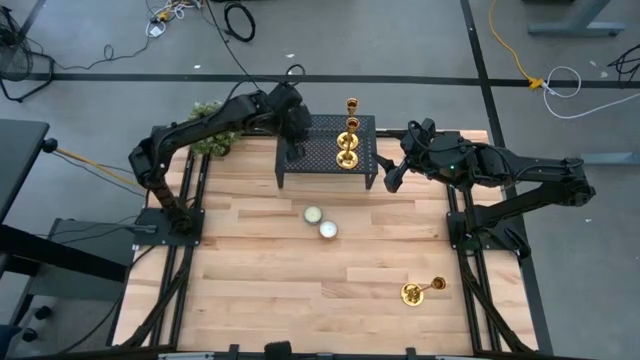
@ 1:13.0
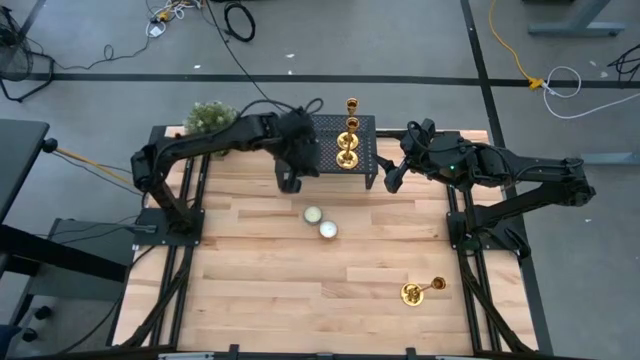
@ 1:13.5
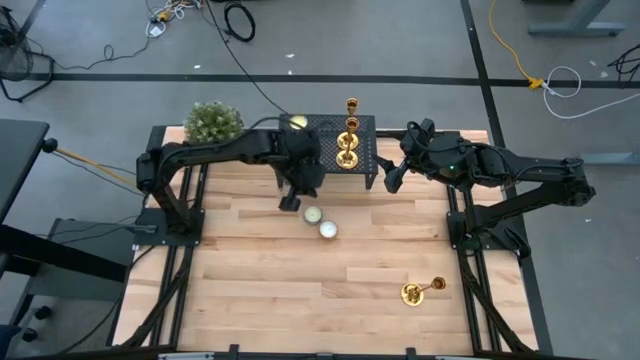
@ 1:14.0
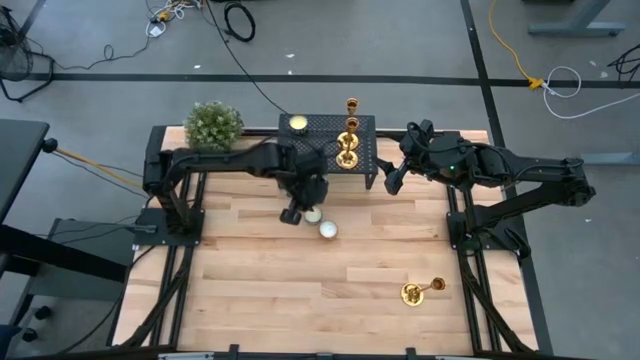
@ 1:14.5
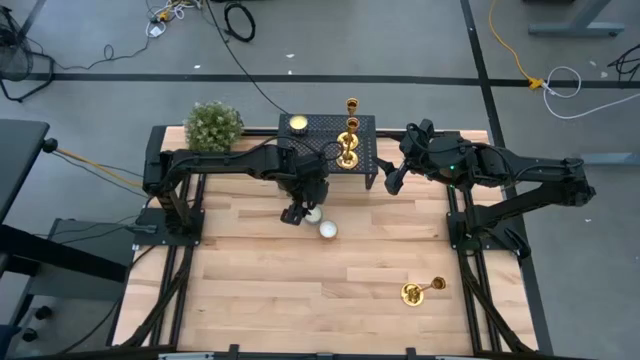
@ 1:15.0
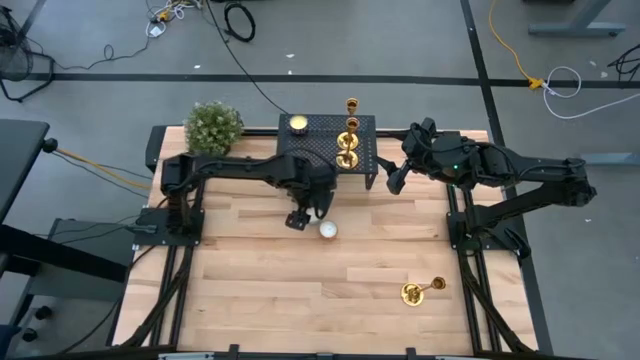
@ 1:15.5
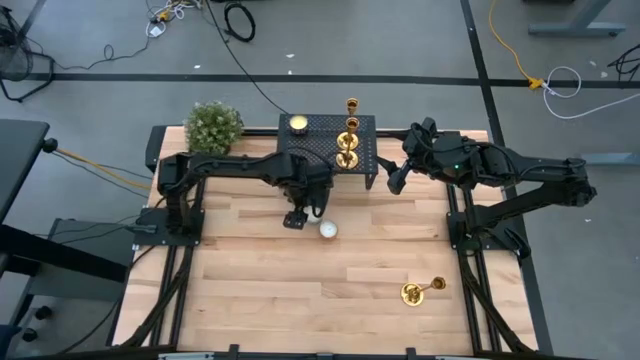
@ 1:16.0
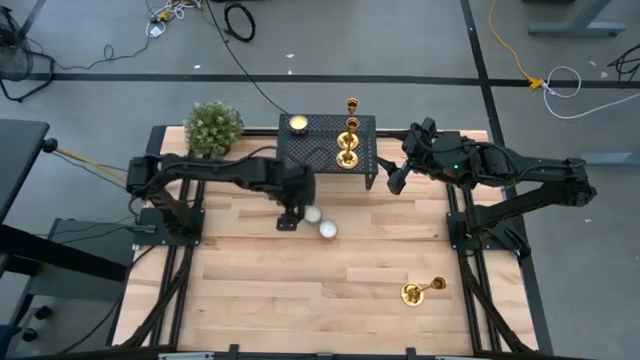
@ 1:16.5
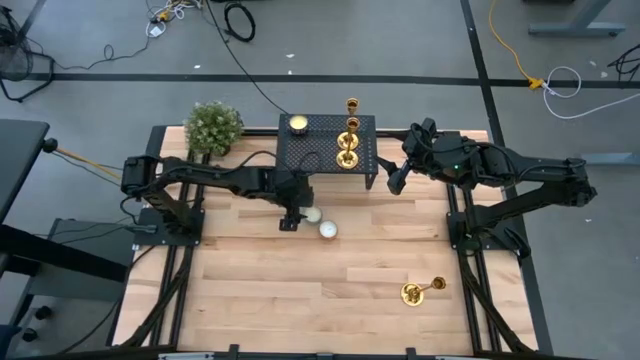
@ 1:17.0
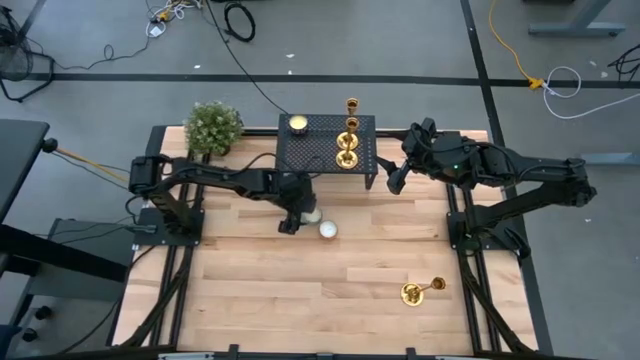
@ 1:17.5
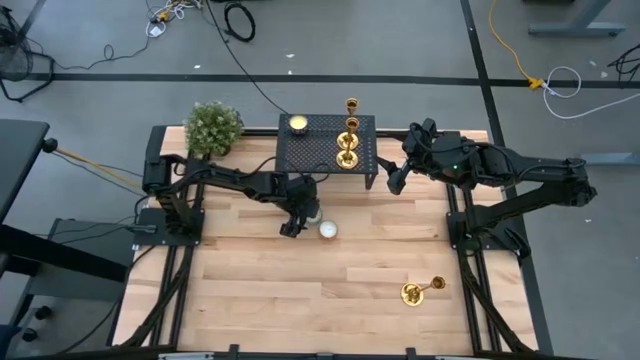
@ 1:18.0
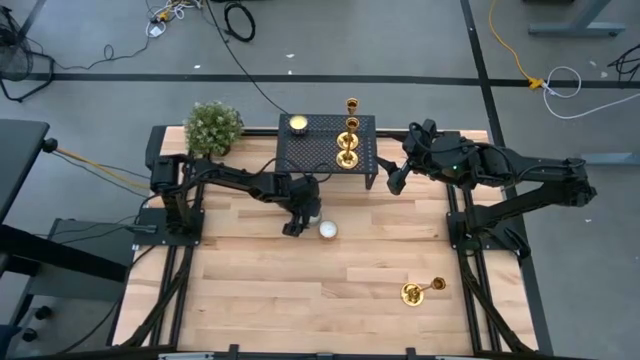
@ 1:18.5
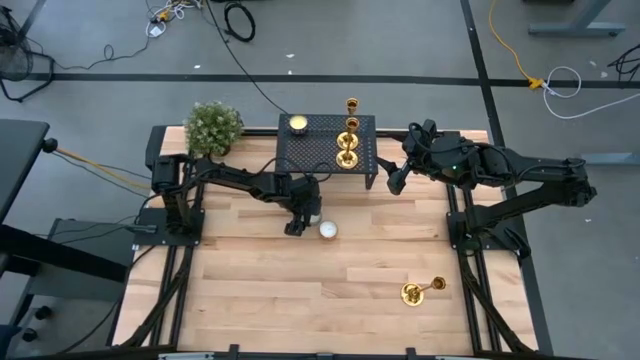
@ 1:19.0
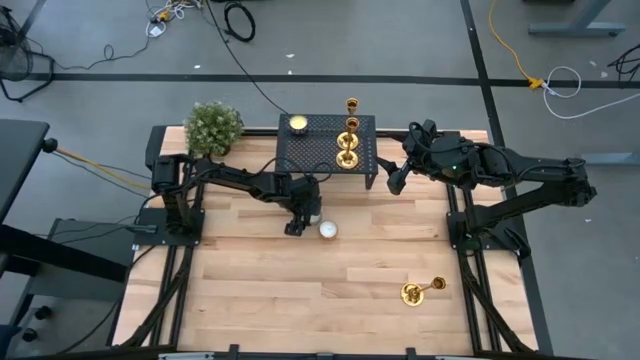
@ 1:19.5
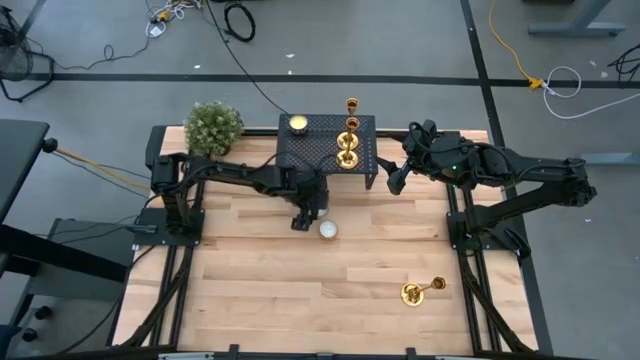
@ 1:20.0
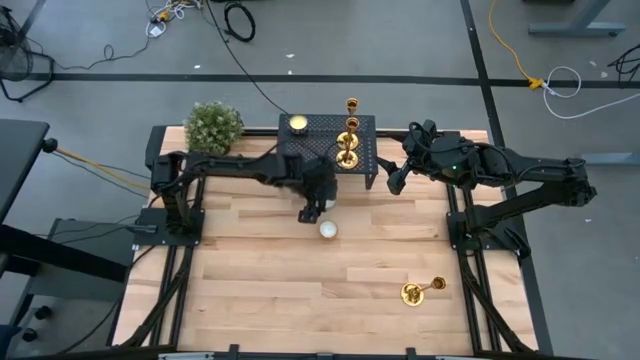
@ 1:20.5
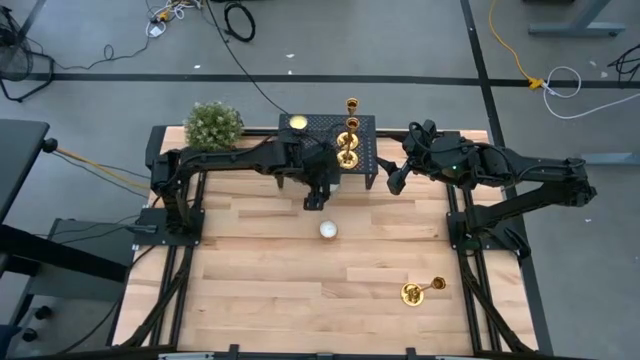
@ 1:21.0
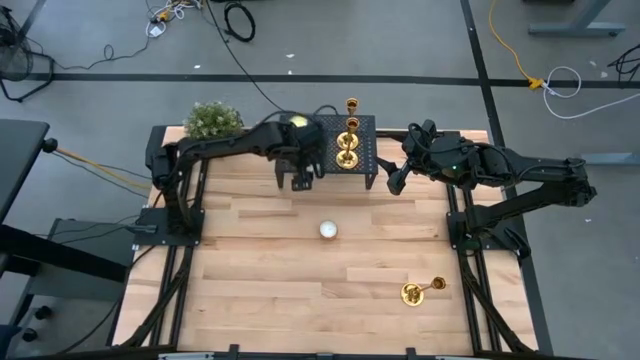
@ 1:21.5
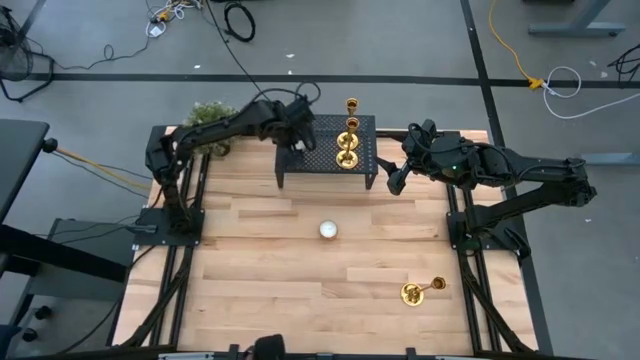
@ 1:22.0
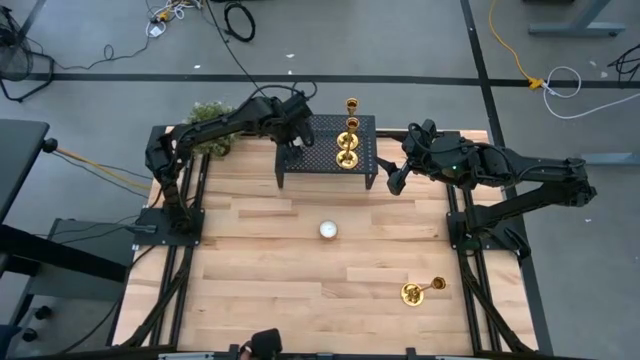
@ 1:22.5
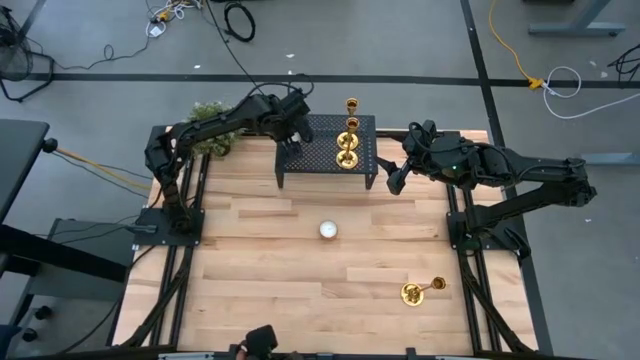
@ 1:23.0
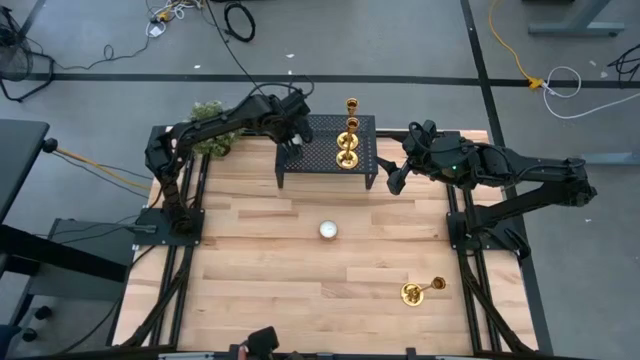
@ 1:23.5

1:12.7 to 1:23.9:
Task: Pick & Place candle stick holders
Put the patterned blue scented candle on the shelf aligned with the other scented candle

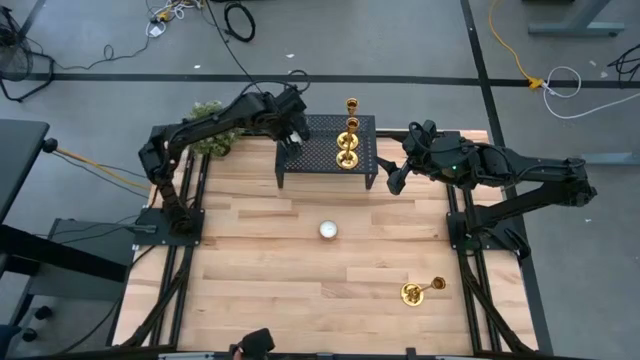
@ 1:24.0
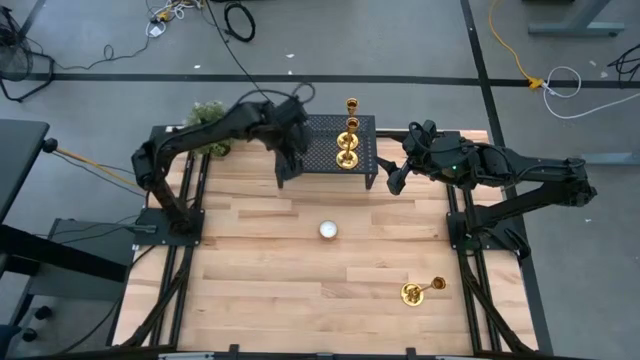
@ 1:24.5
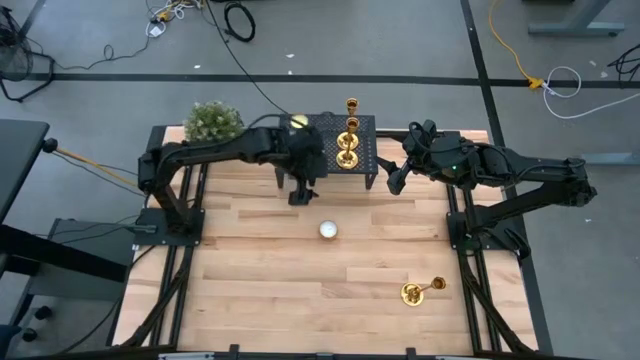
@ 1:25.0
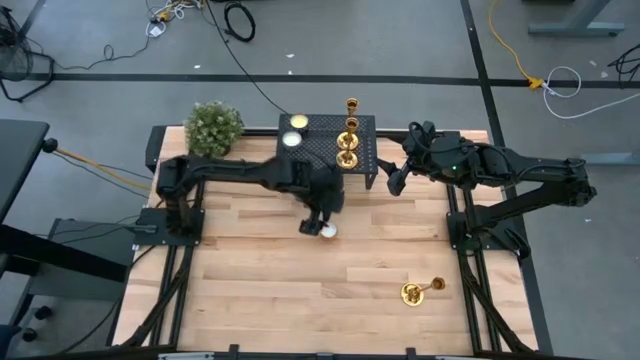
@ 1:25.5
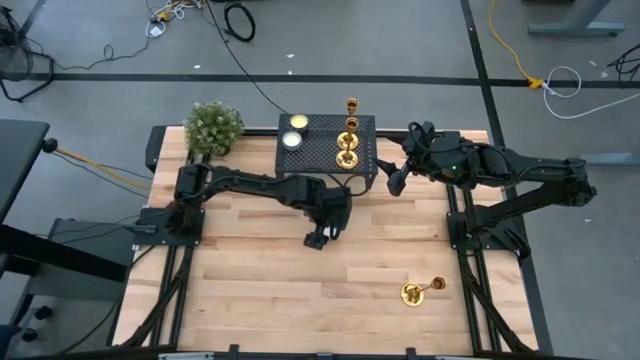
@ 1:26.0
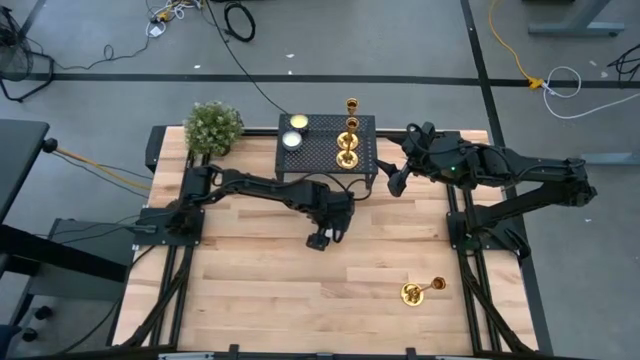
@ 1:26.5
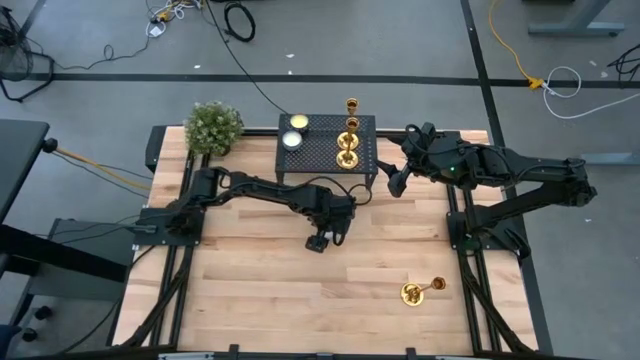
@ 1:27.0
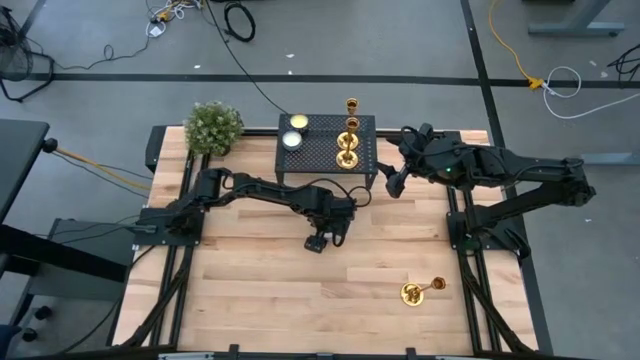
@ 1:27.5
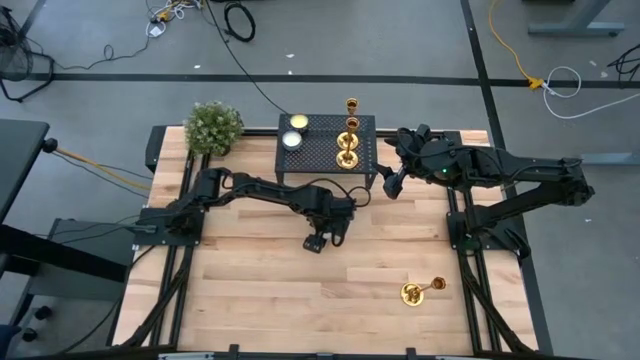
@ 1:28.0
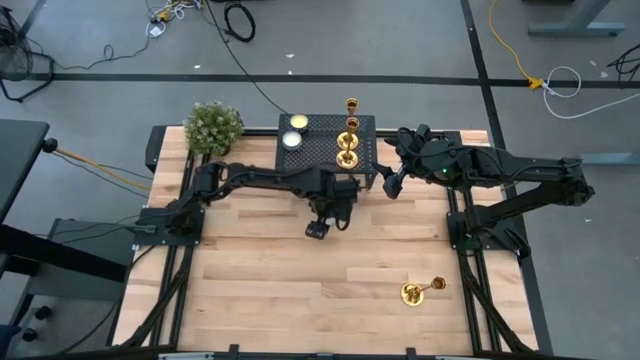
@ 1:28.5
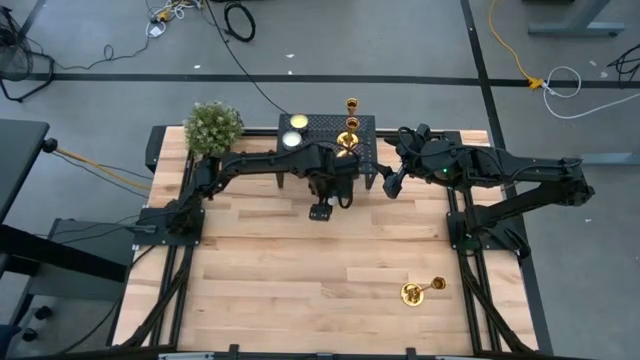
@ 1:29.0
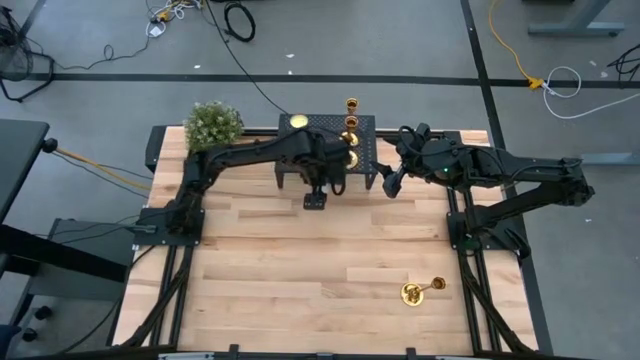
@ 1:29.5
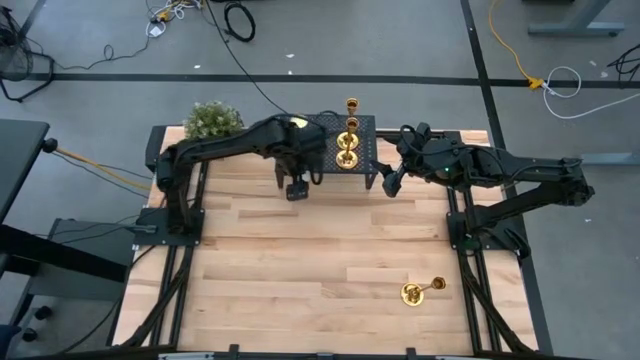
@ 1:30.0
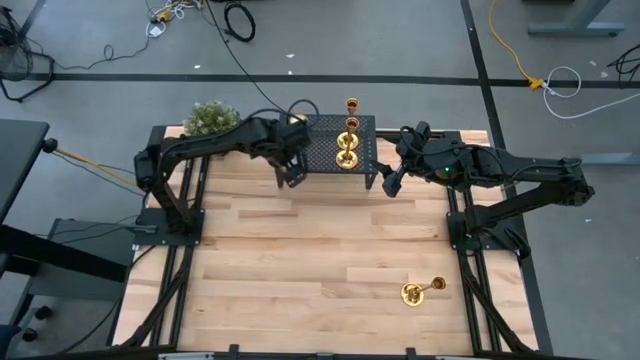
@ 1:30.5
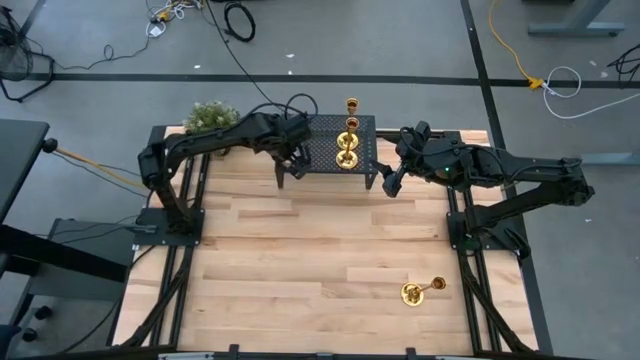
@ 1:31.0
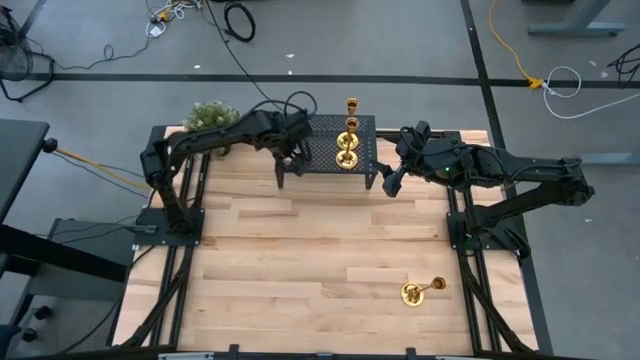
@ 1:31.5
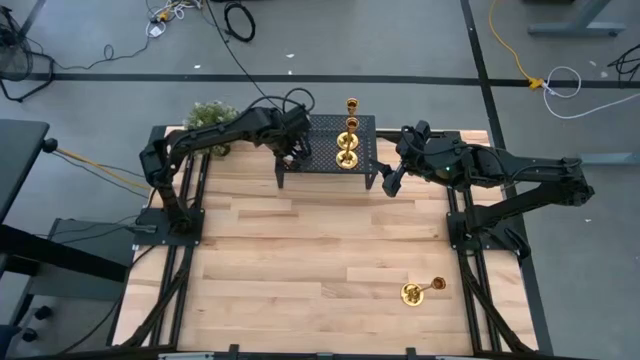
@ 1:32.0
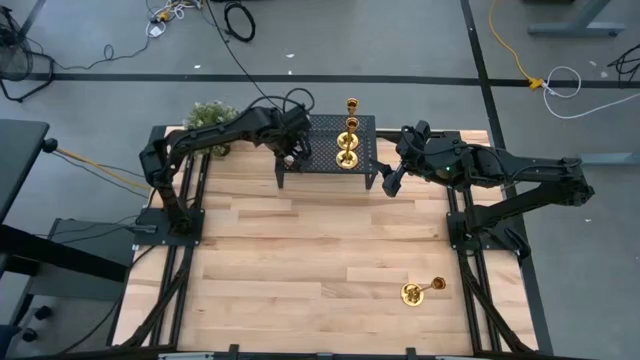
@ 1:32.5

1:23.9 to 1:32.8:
Put the patterned yellow scented candle on the shelf aligned with the other scented candles

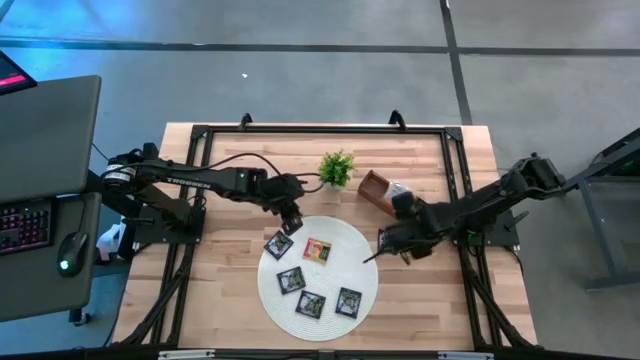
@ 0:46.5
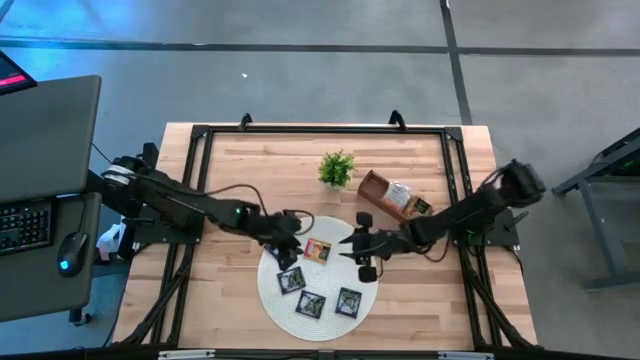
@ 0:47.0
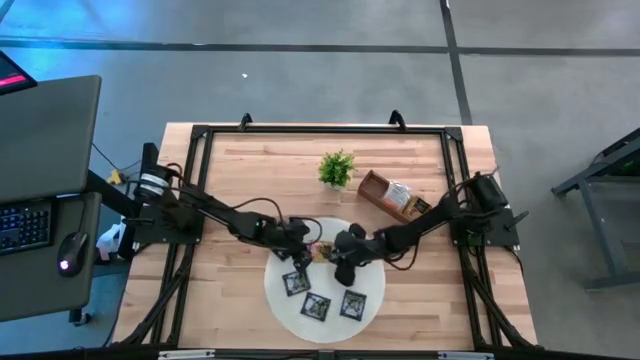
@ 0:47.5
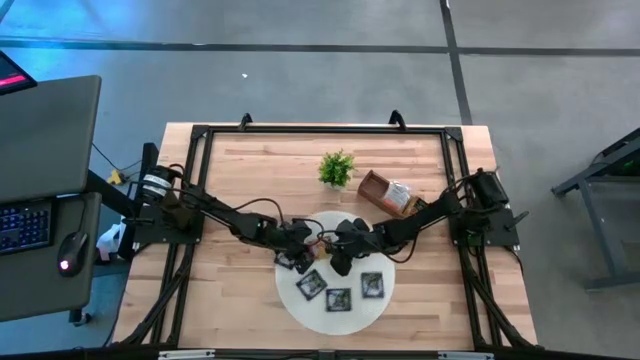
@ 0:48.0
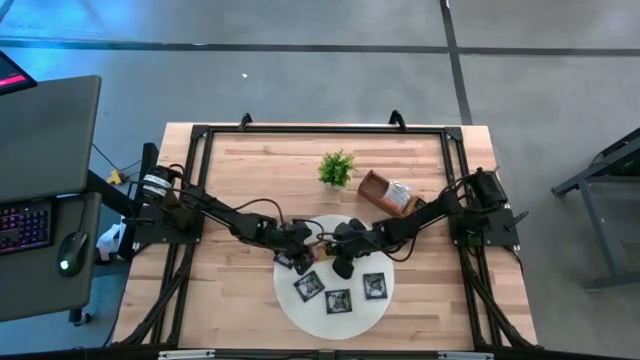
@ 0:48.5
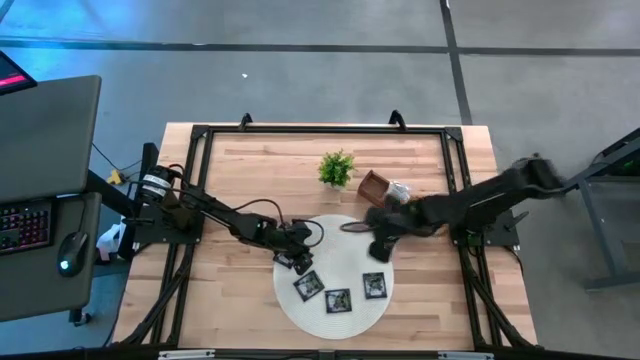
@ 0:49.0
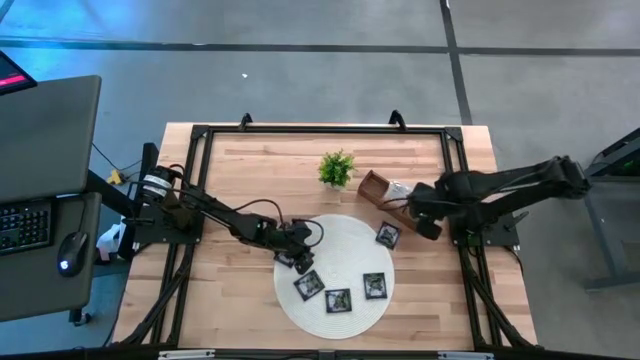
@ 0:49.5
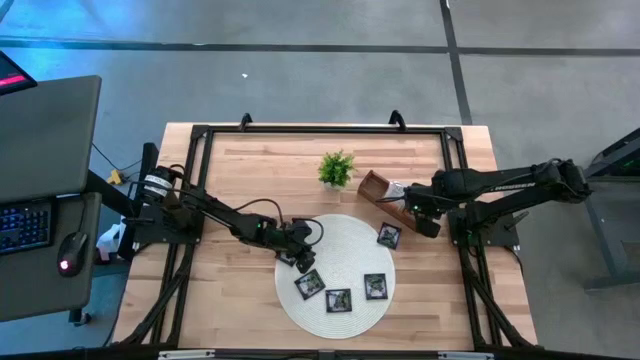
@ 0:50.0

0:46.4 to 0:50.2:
Task: Pick & Place Tea
Put the yellow tea bag into the right section of the wooden organizer
